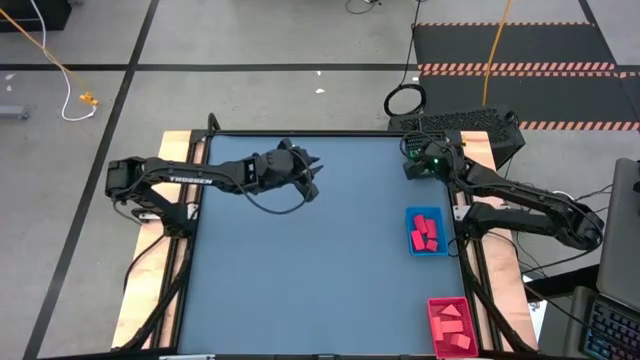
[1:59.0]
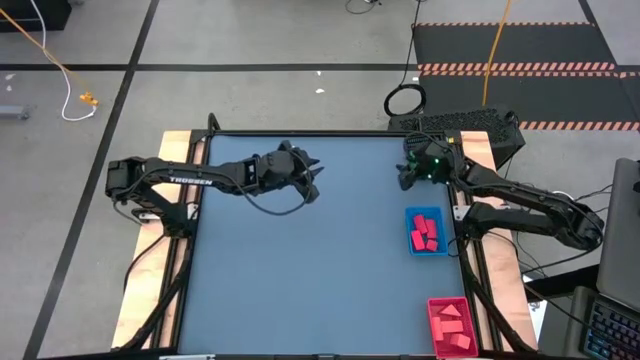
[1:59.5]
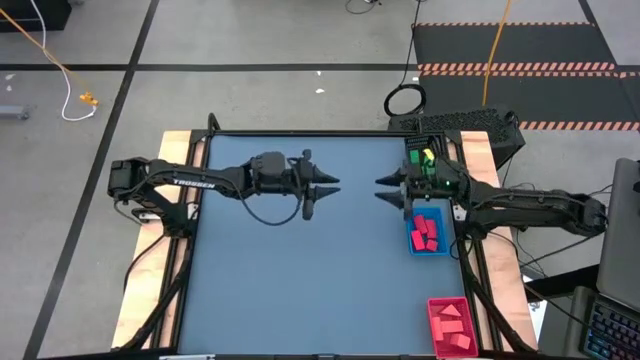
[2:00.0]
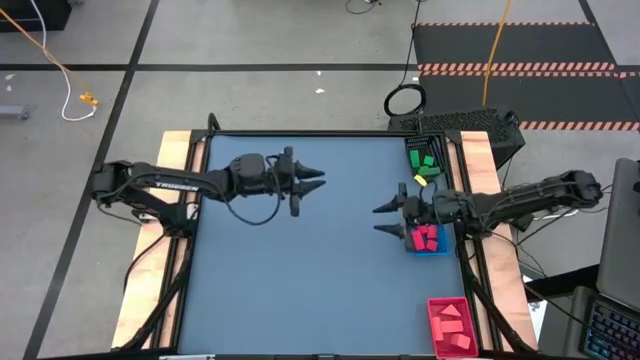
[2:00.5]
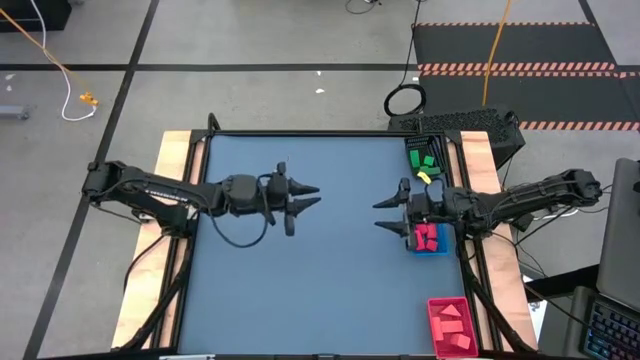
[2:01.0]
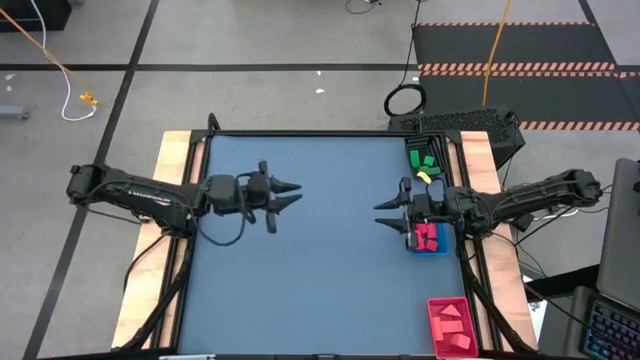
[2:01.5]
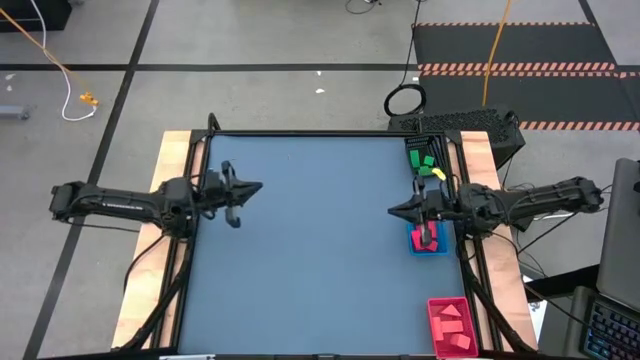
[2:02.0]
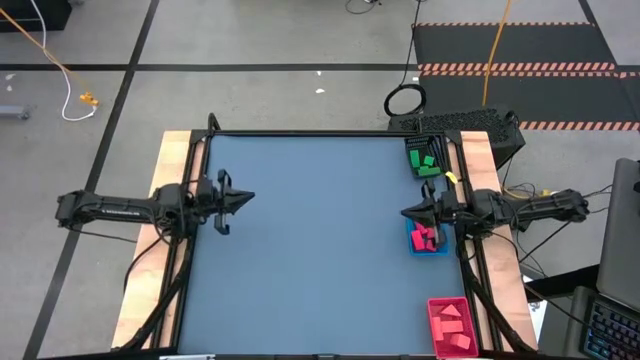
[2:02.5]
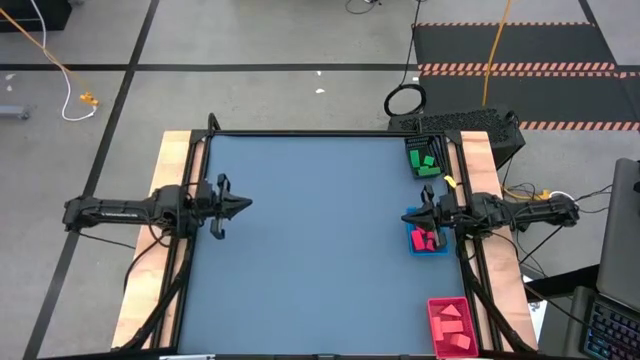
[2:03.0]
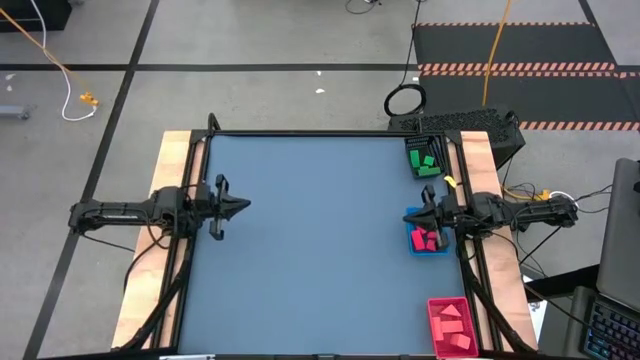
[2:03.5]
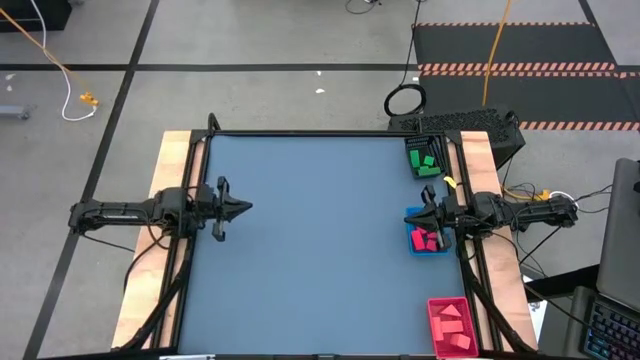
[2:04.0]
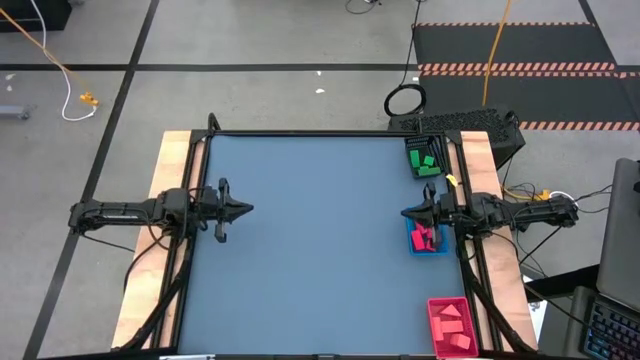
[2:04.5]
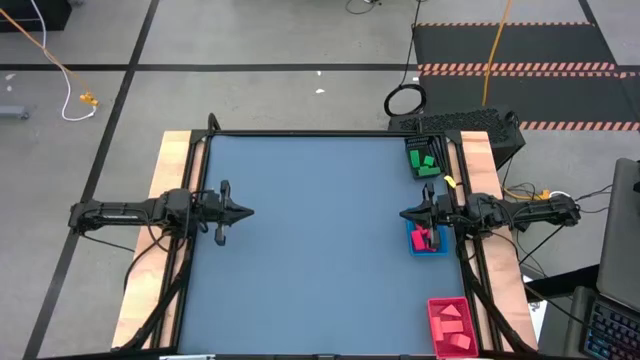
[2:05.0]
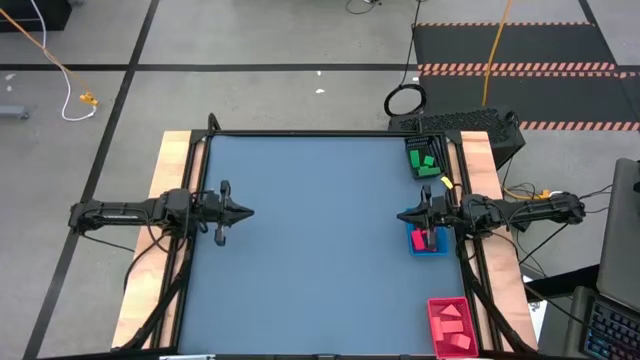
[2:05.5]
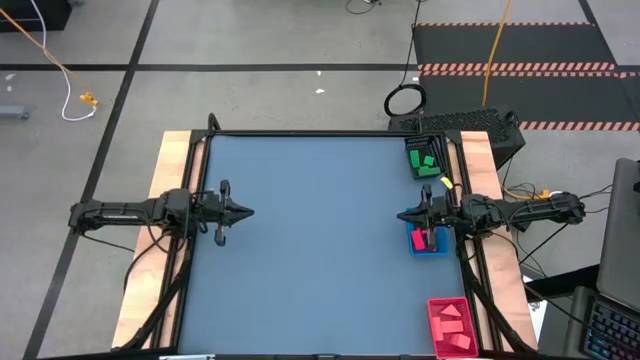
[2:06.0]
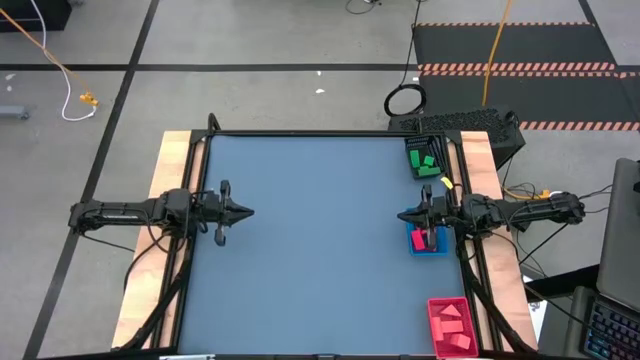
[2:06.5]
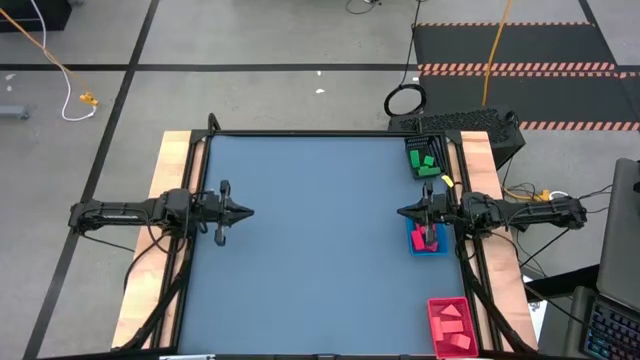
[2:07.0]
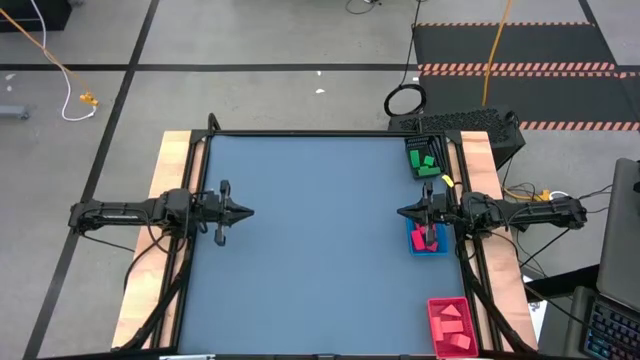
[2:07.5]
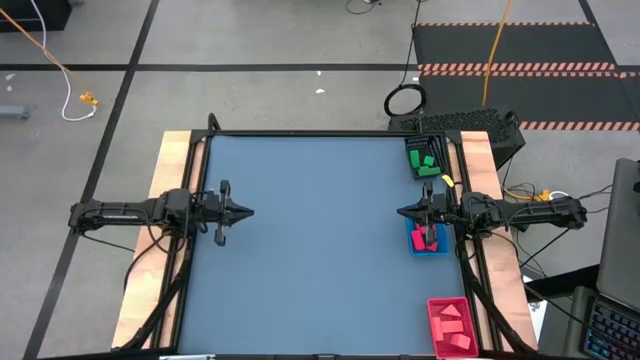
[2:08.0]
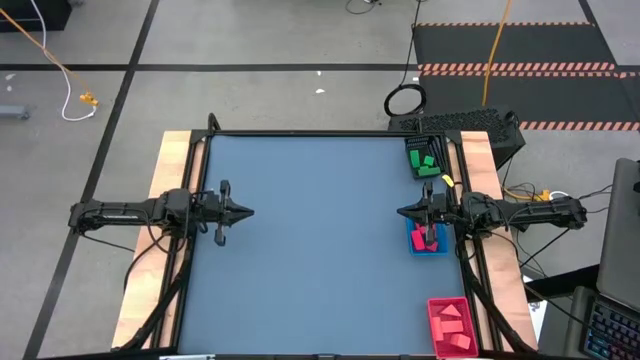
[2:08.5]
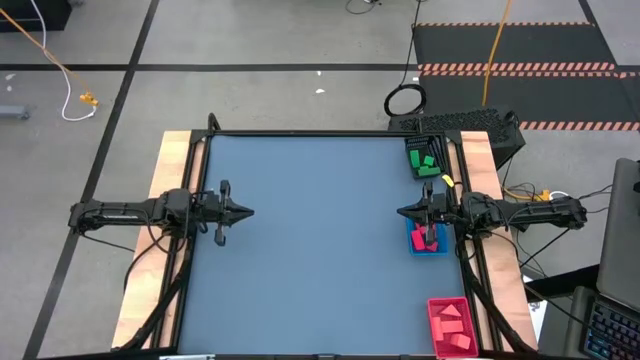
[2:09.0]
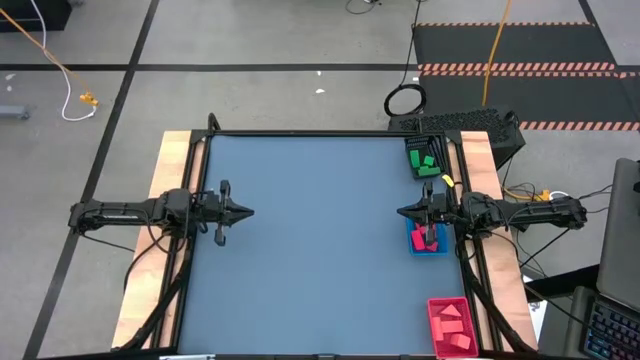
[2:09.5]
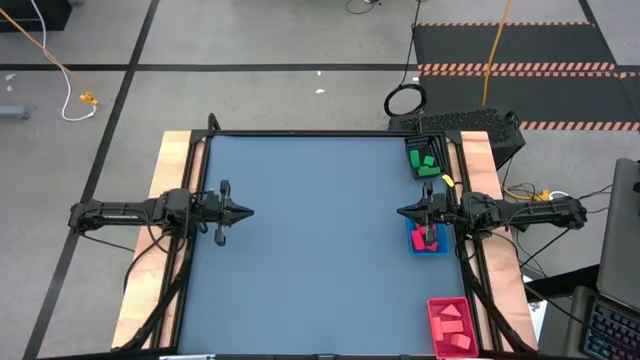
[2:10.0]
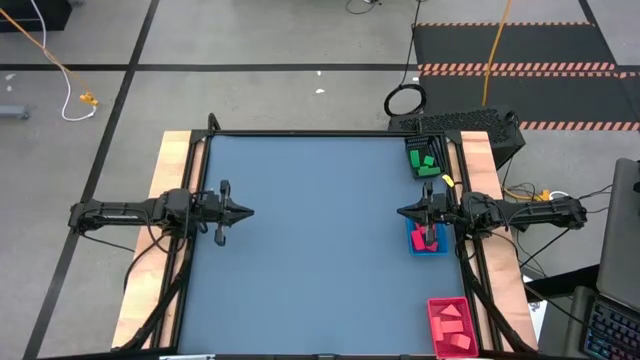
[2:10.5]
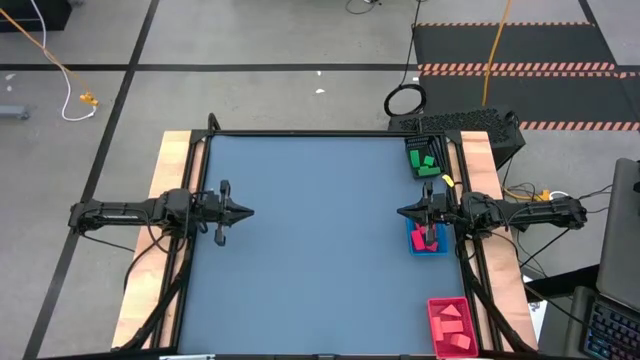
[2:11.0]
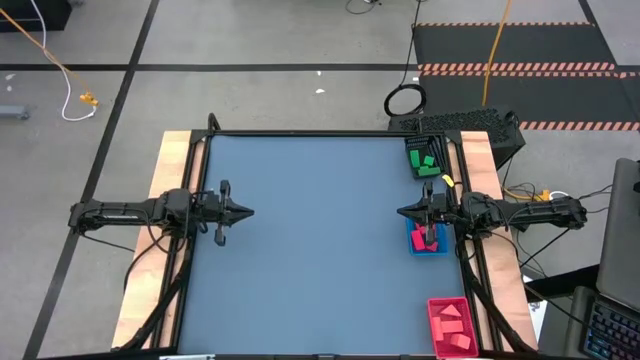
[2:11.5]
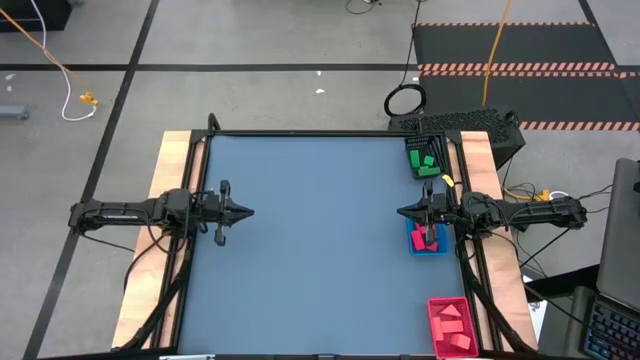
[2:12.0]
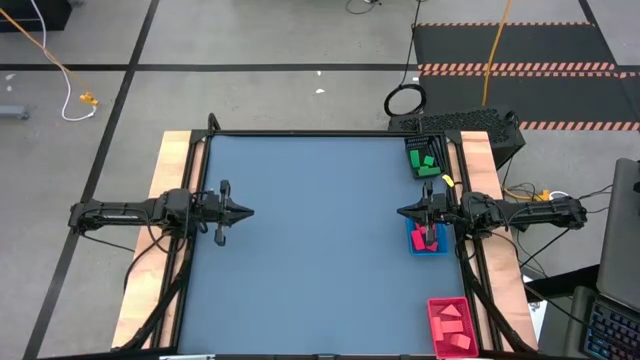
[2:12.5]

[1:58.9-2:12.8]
Task: Sort & place blocks by color
Return to Home Position

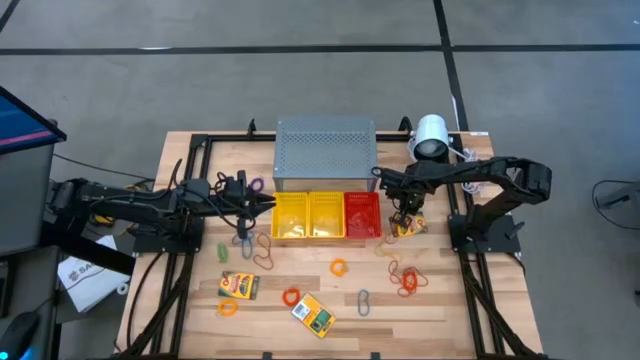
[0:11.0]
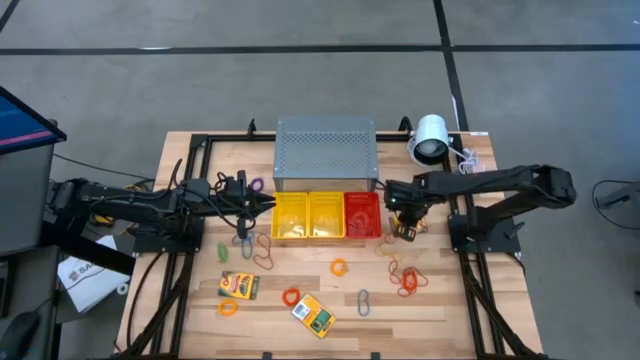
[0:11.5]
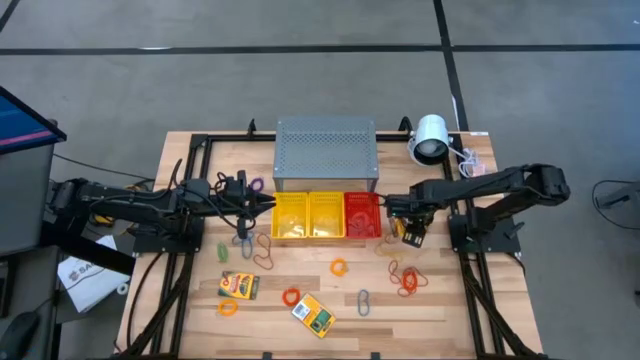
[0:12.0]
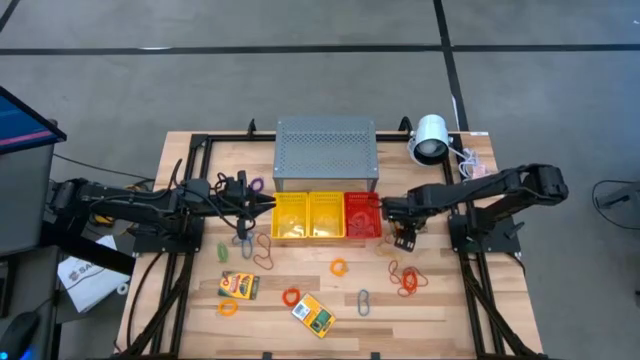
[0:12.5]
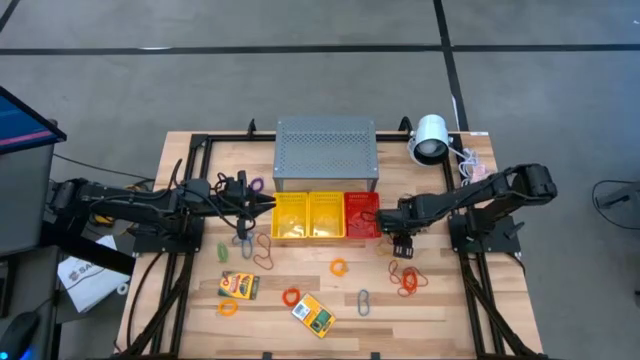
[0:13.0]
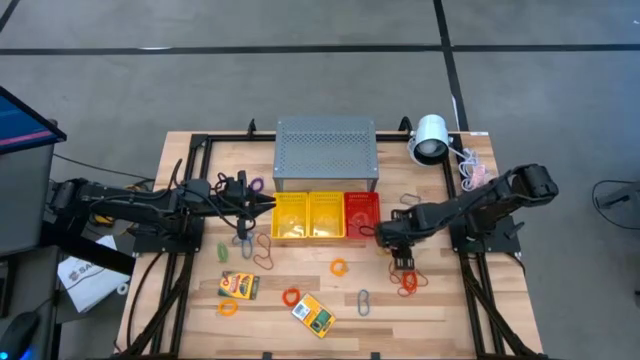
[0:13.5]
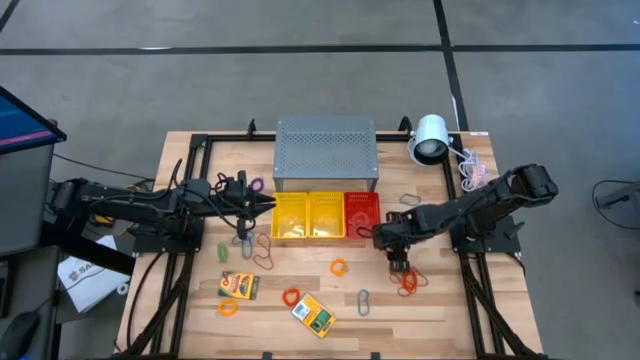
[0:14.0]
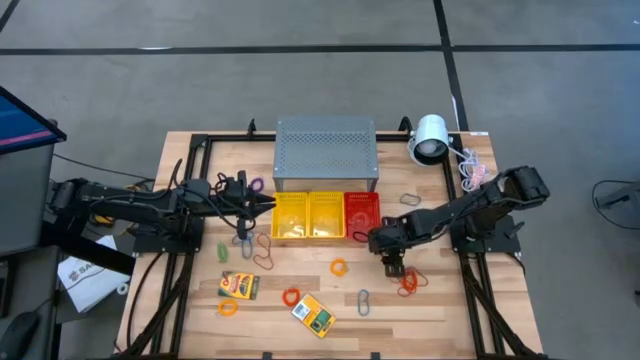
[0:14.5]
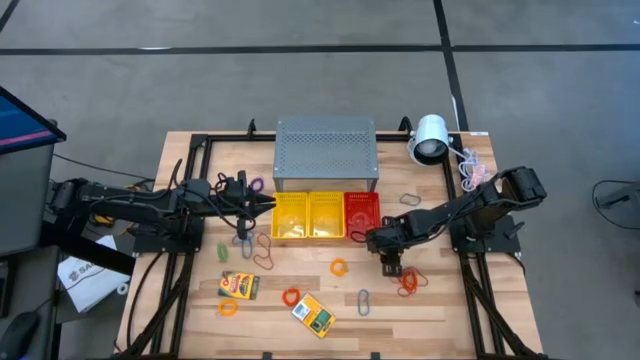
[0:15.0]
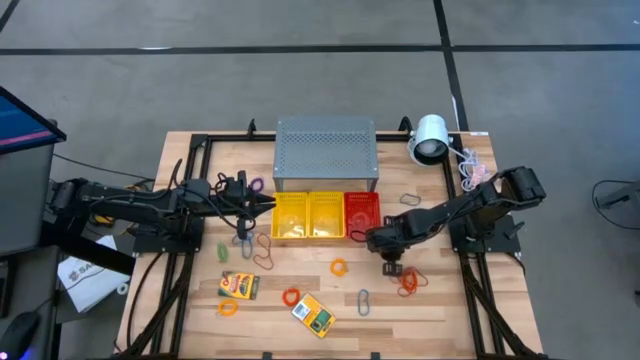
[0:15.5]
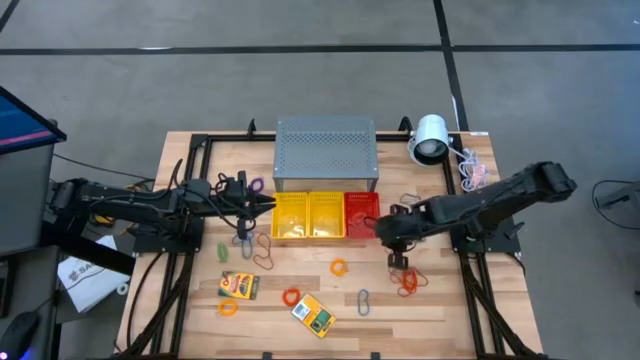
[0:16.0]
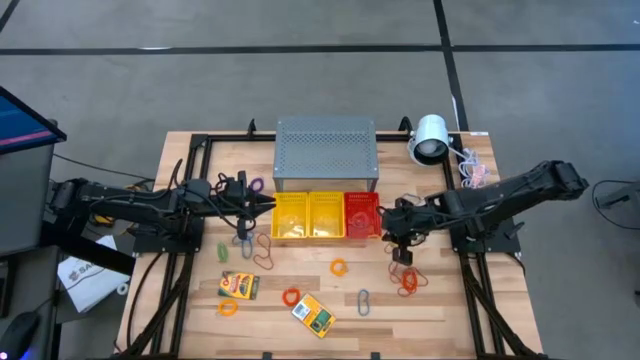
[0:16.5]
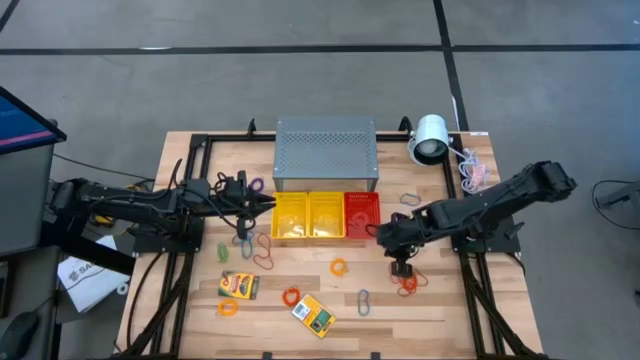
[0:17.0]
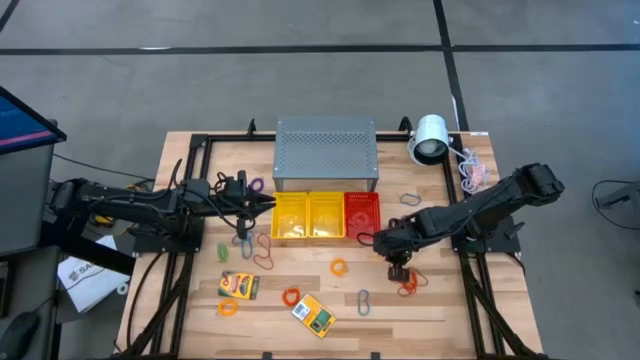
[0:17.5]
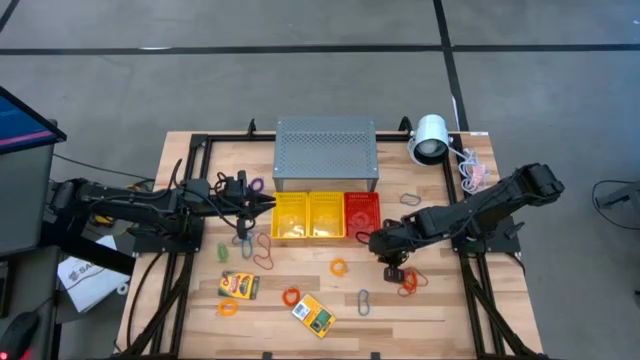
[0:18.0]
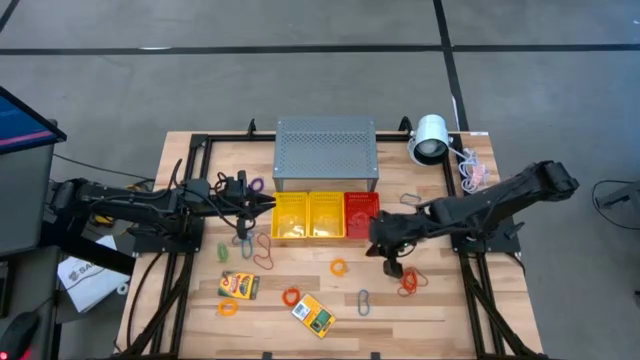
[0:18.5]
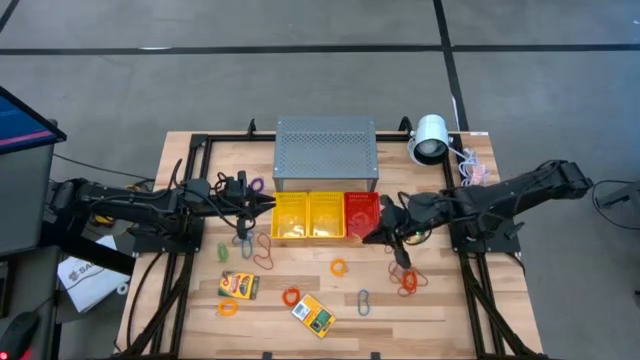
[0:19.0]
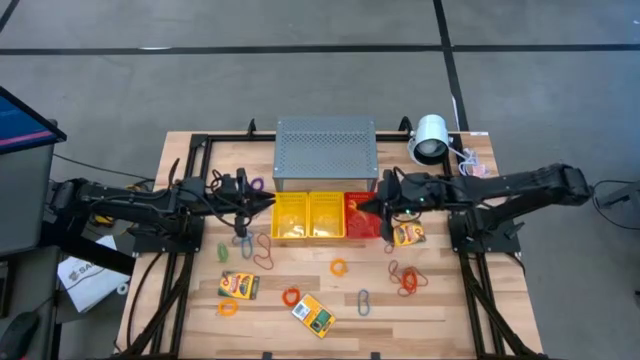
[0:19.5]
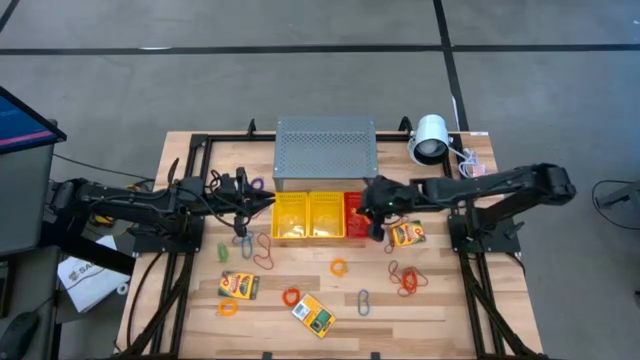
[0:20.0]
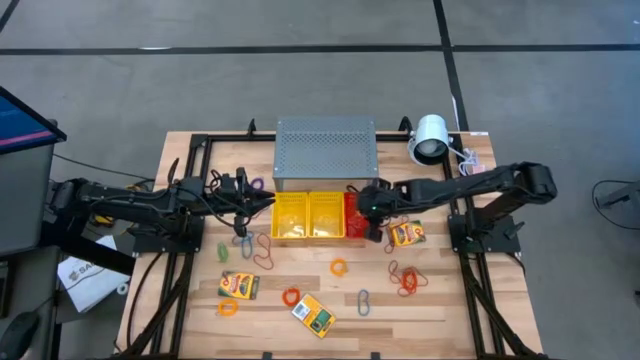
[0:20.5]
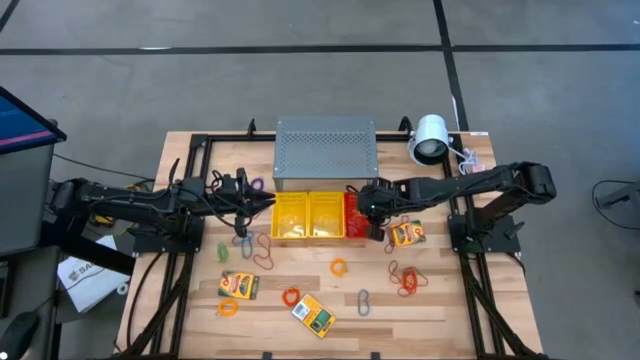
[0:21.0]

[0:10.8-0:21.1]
Task: Pick & Place Office Desk Supplies
Put the yellow rubber band into the red bin
